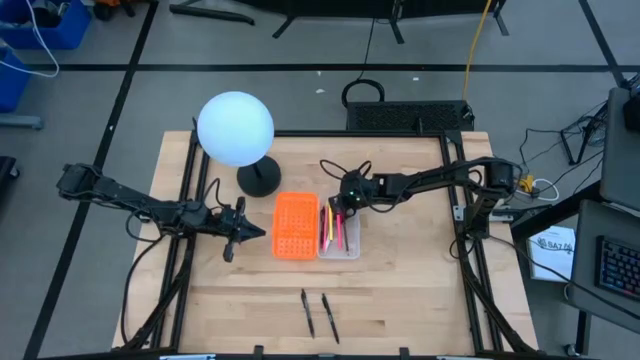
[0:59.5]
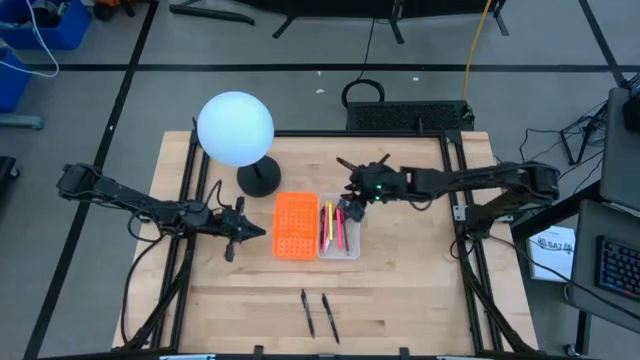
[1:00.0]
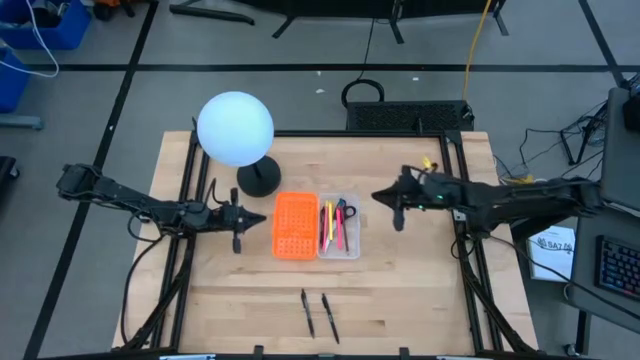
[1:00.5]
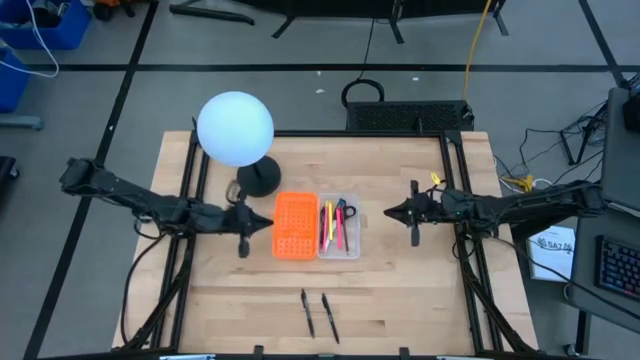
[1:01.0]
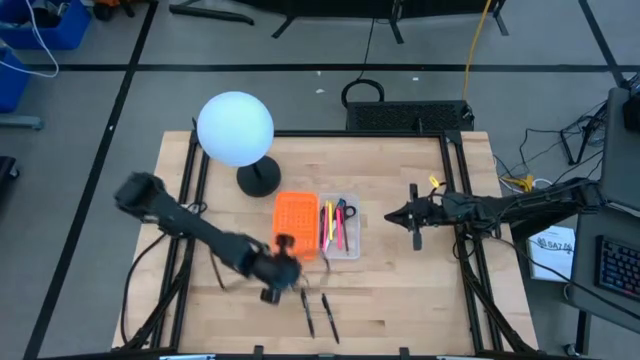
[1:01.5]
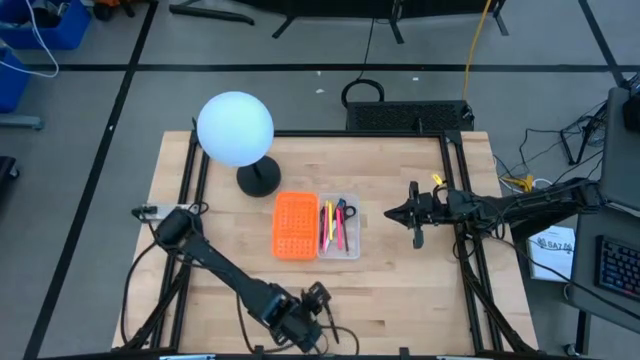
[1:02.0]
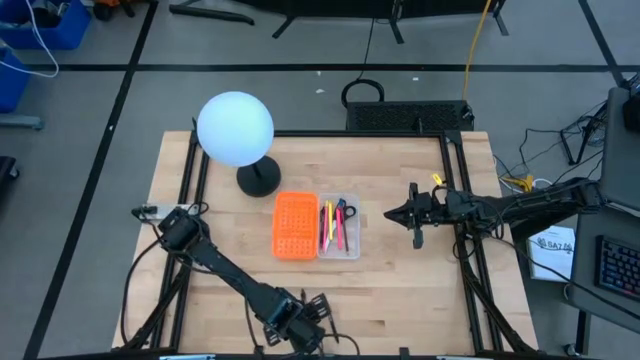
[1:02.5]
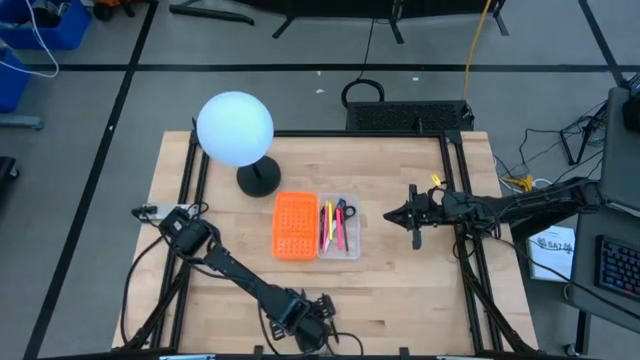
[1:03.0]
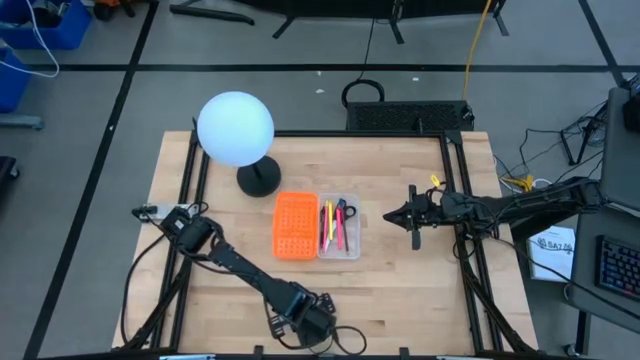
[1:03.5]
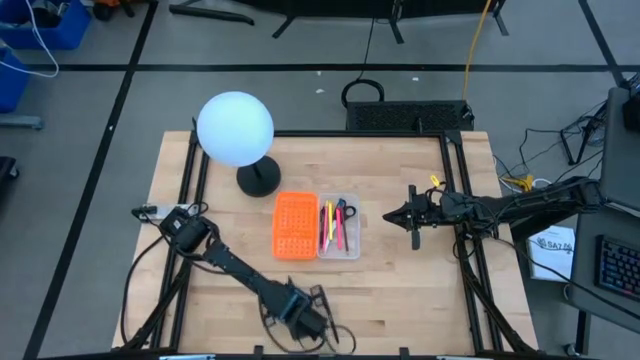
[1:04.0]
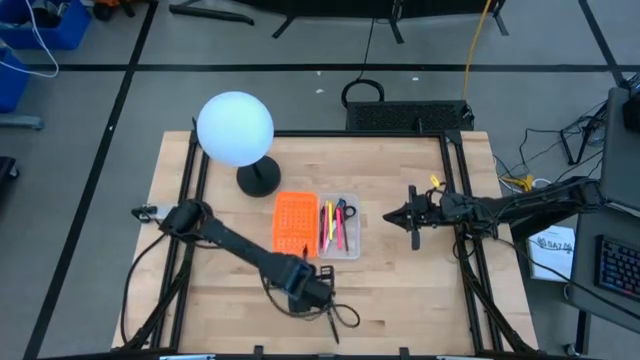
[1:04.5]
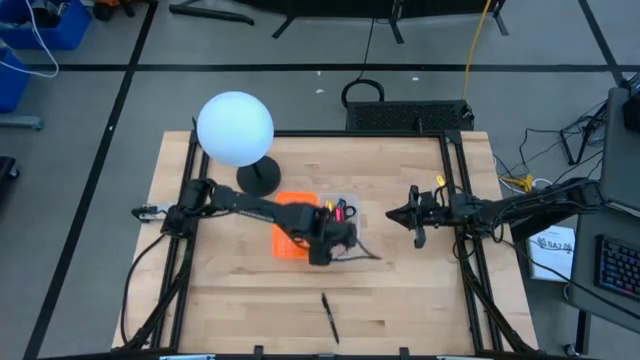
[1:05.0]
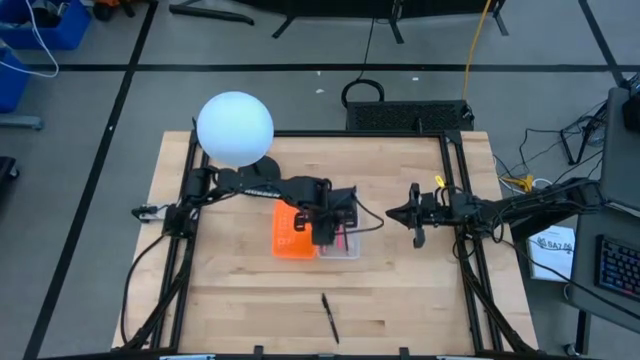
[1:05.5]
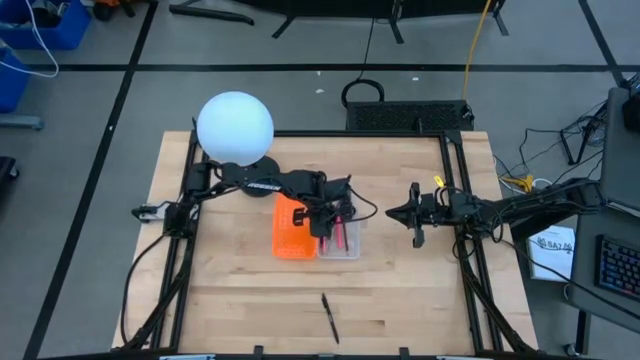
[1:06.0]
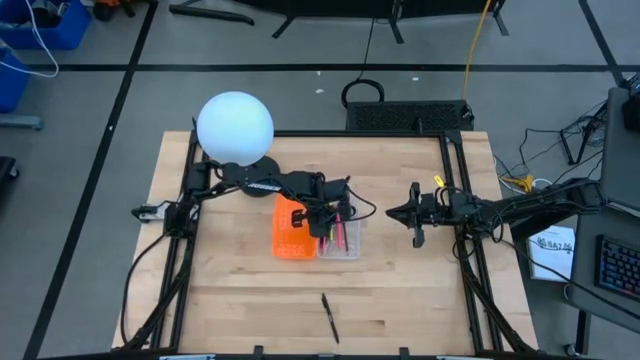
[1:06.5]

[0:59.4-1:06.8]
Task: Pick & place school supplies into a supply box
Put the transparent pen into the orange supply box

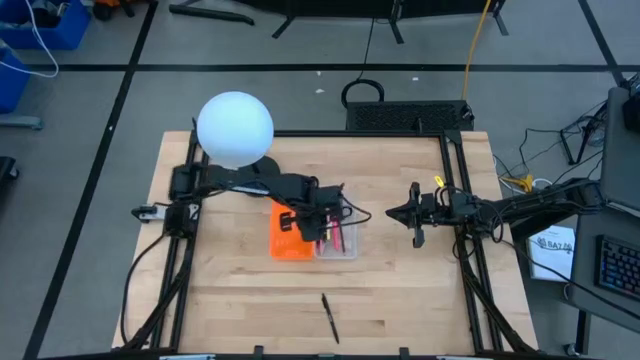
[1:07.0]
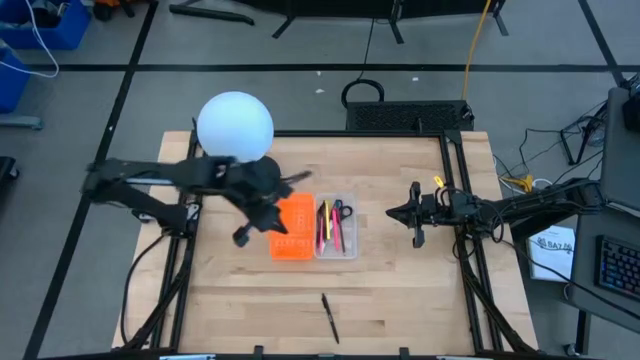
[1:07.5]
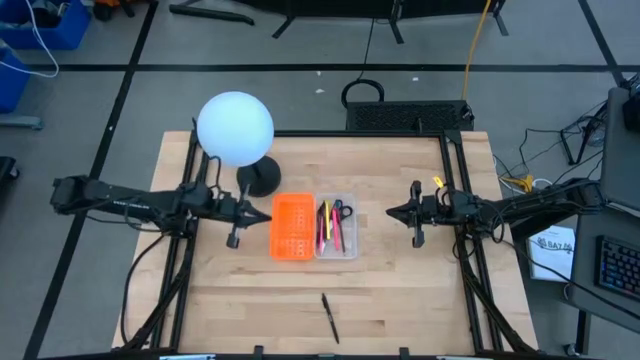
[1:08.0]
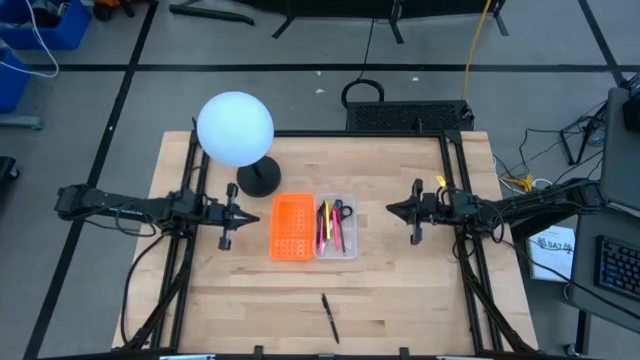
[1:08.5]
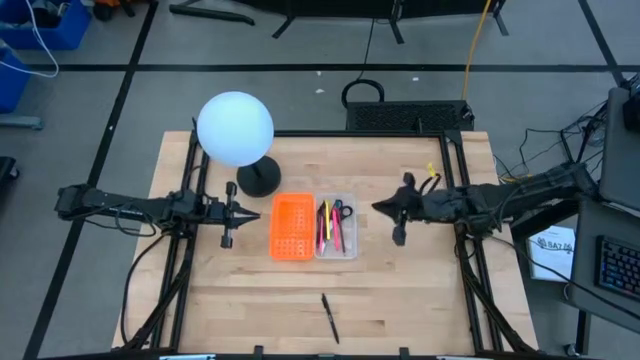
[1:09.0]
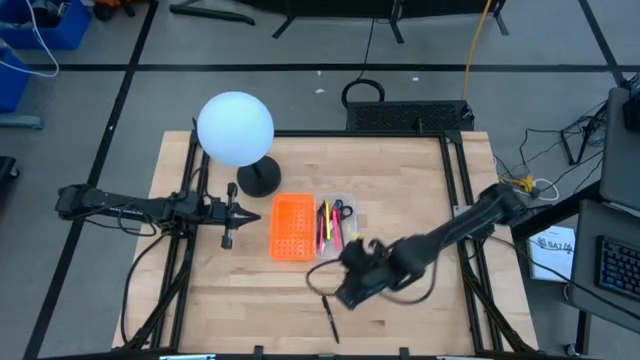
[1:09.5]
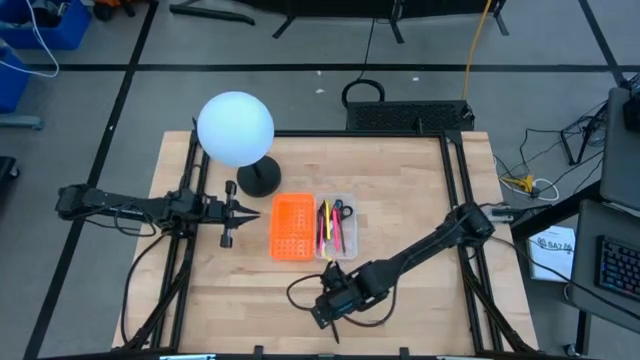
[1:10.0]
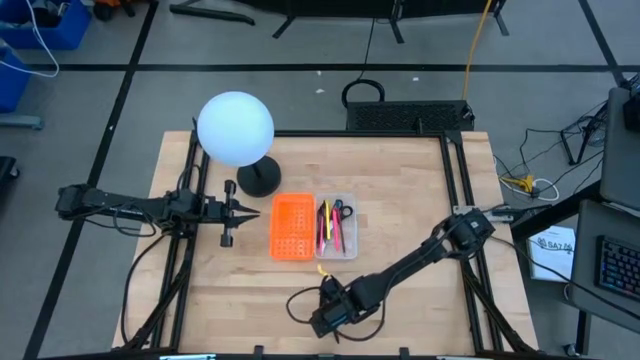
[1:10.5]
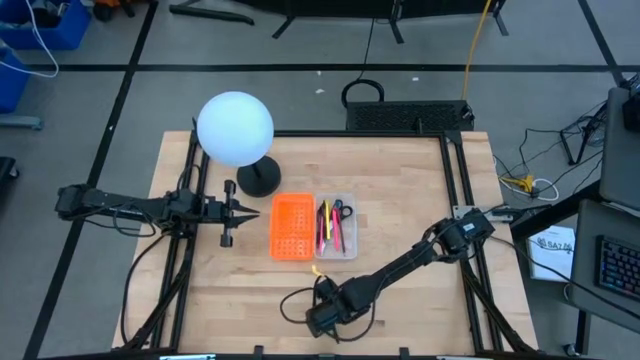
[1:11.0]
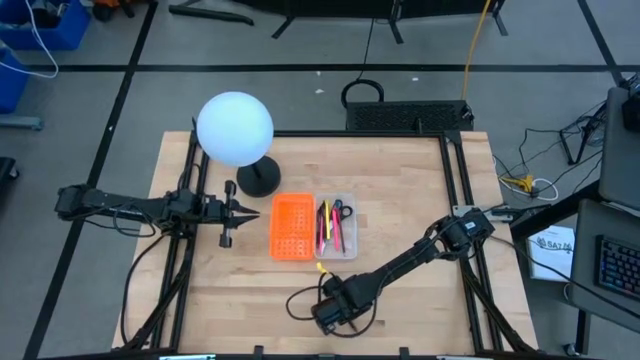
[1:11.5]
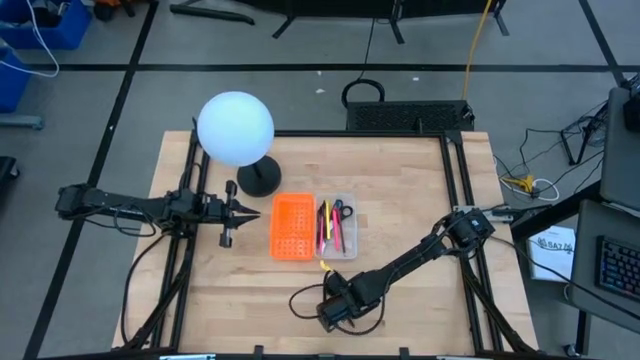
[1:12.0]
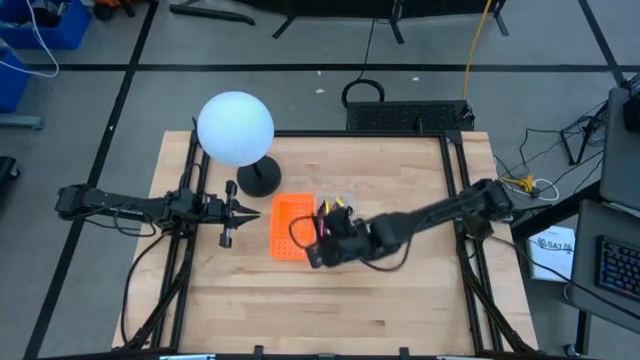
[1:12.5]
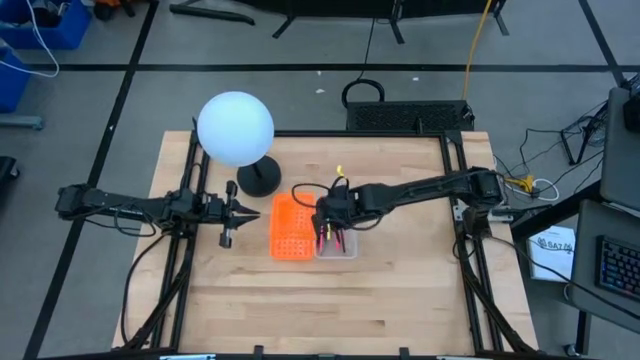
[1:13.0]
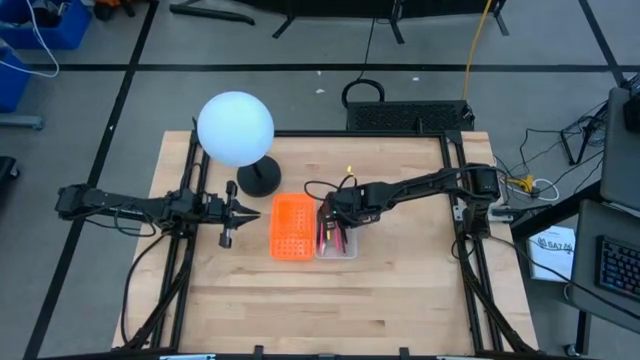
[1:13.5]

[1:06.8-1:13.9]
Put the black pen into the orange supply box

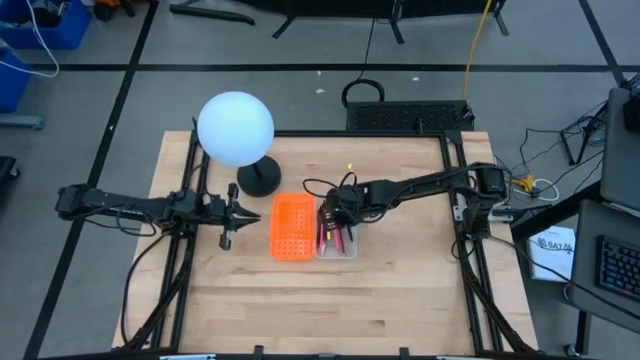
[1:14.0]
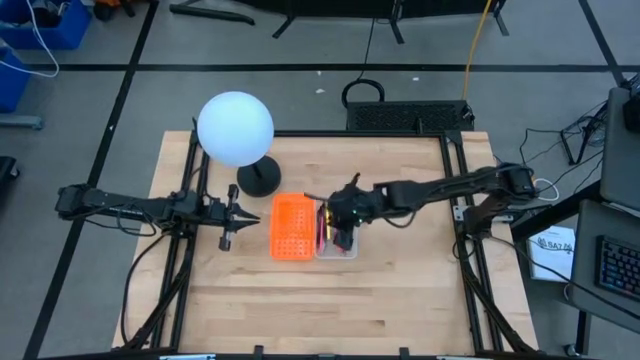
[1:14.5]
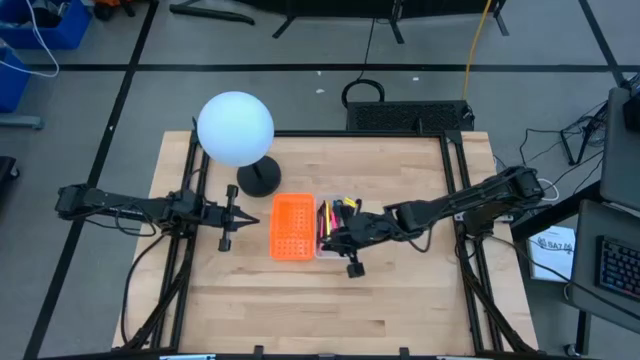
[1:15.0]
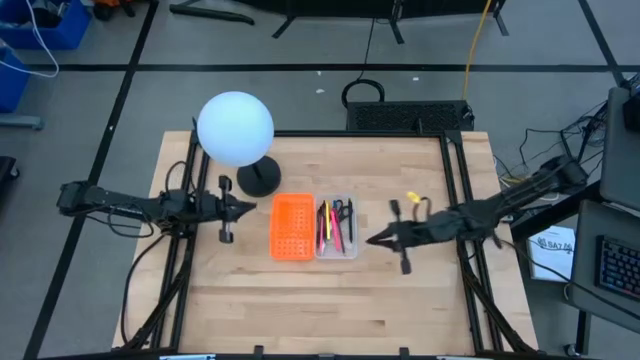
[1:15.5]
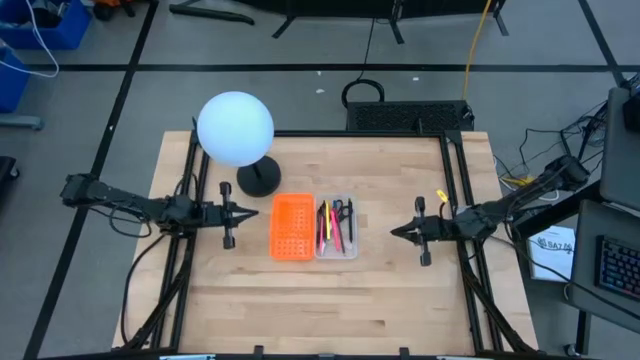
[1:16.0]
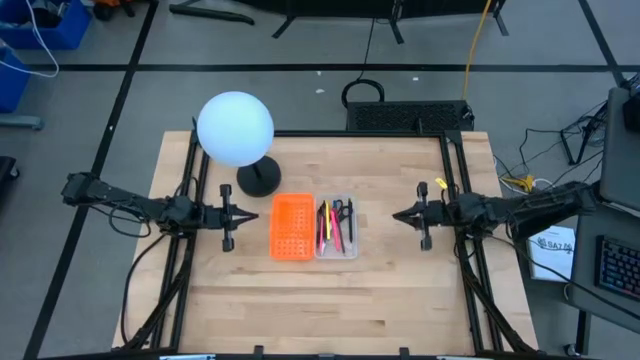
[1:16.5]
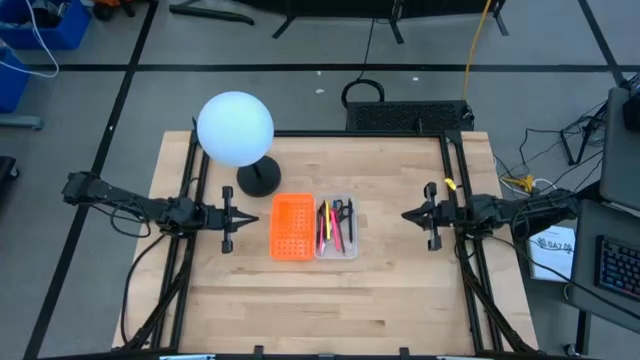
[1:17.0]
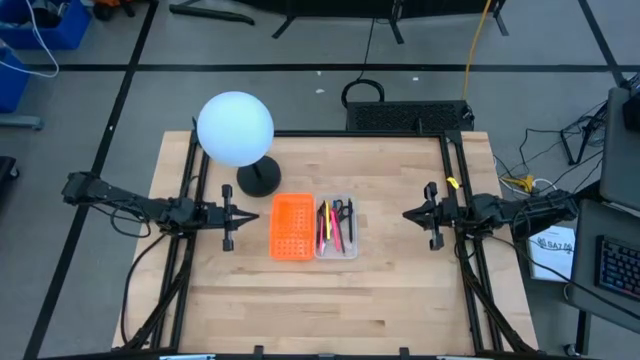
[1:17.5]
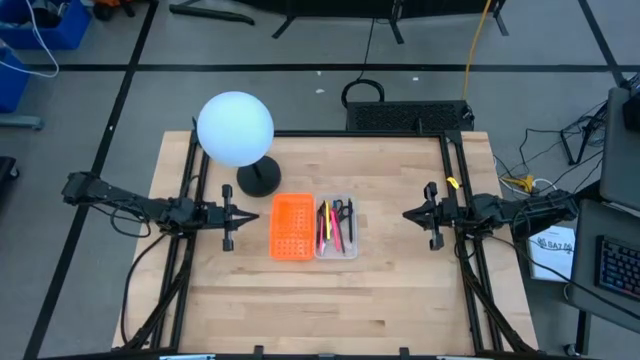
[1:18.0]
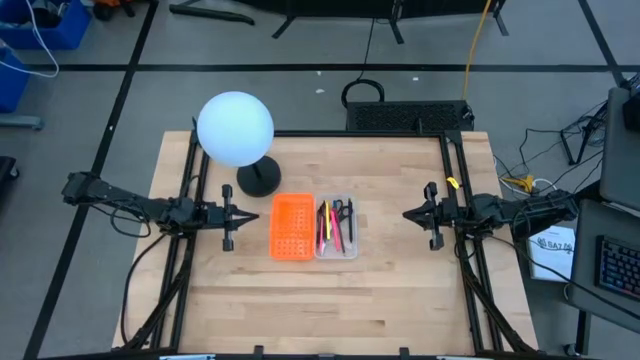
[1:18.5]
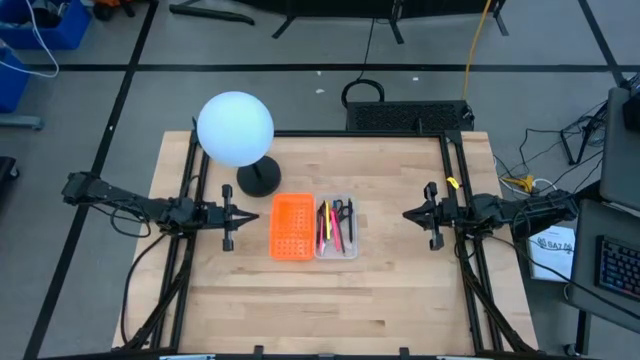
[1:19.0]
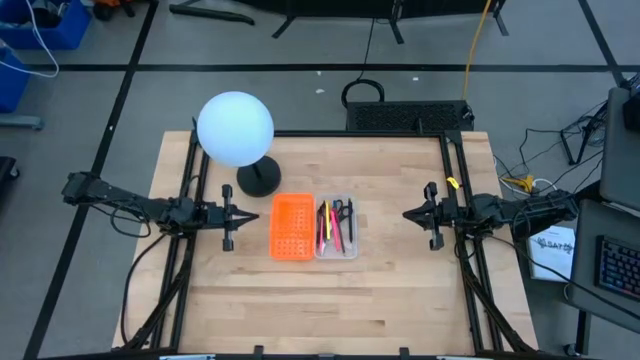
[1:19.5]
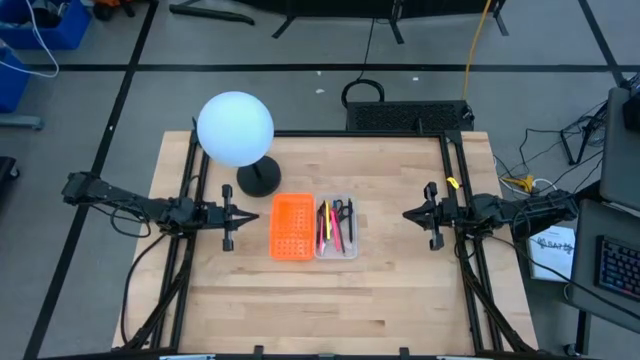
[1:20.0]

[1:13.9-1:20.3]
Return to Home Position

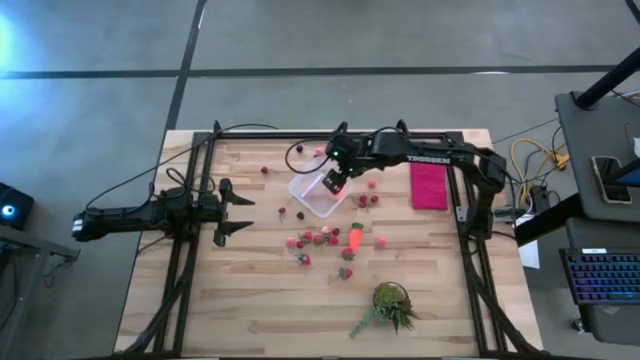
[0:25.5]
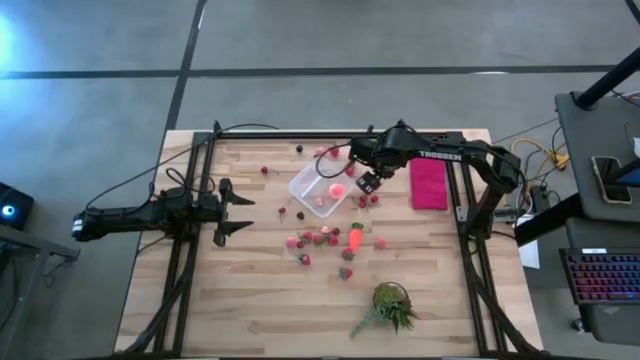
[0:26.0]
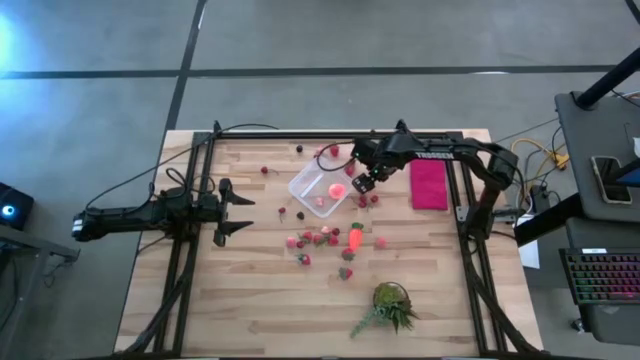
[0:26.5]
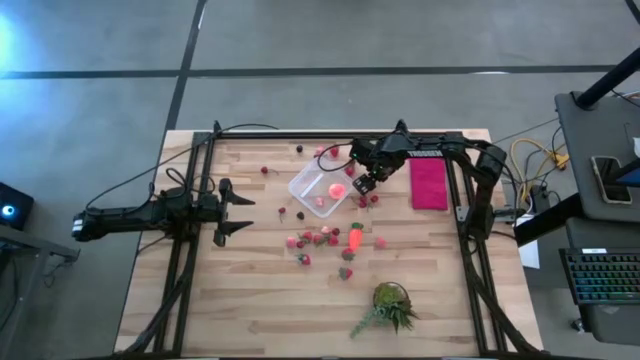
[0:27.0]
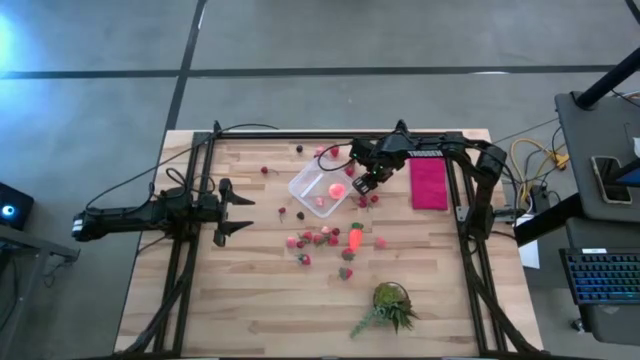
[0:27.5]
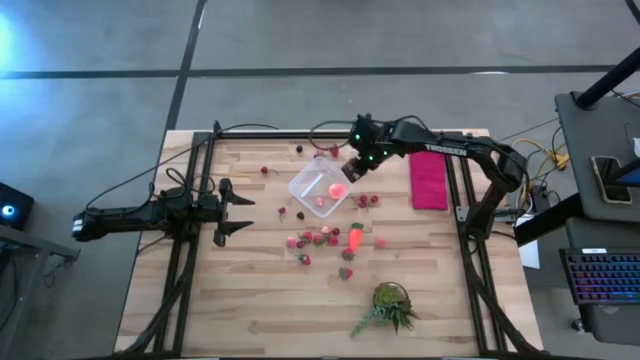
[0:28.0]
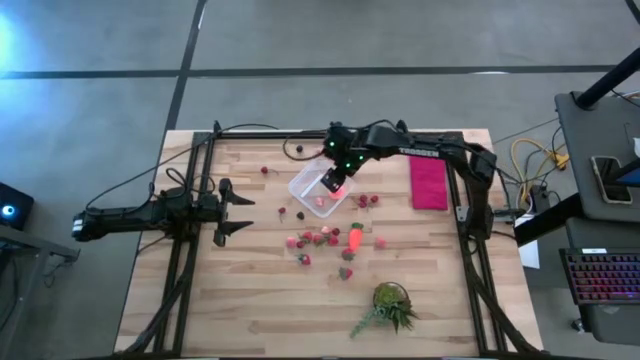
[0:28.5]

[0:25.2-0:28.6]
Task: Pick and placing Produce into tupperware
Put the pink apricot into the transparent container
